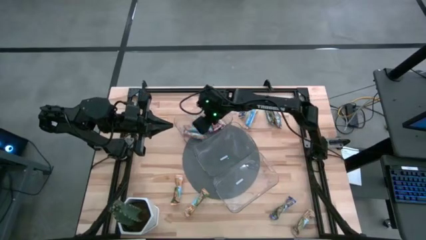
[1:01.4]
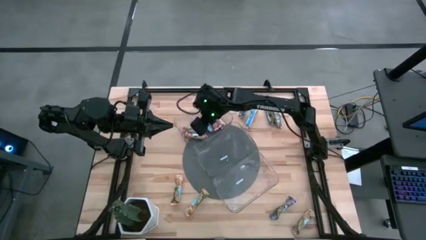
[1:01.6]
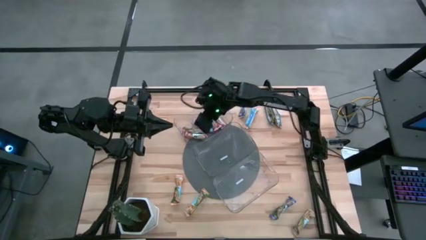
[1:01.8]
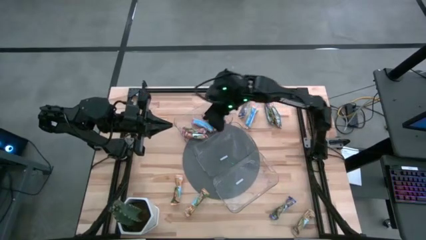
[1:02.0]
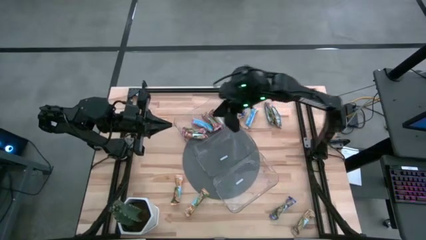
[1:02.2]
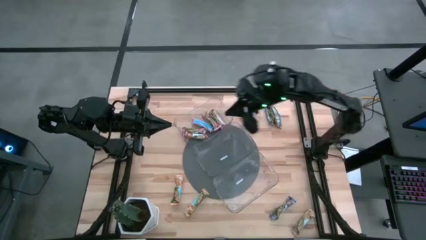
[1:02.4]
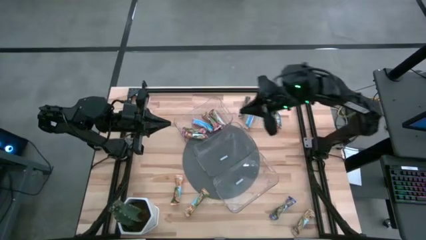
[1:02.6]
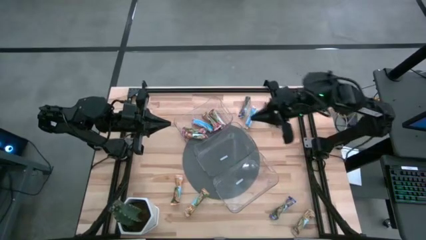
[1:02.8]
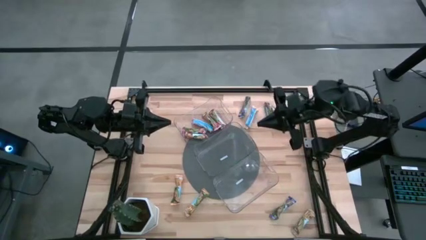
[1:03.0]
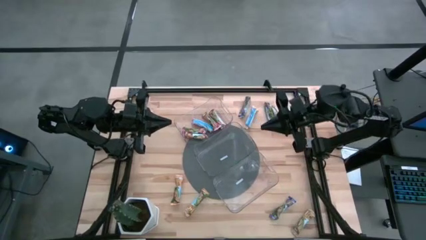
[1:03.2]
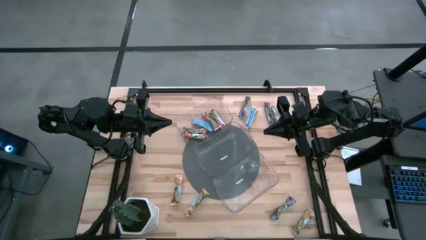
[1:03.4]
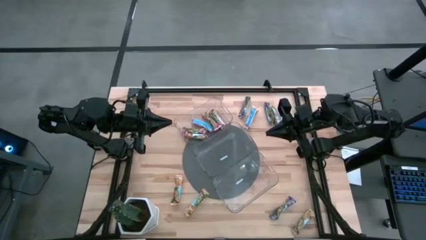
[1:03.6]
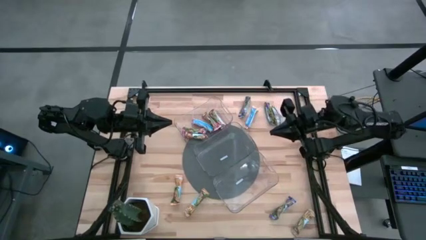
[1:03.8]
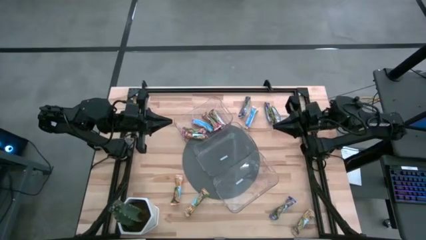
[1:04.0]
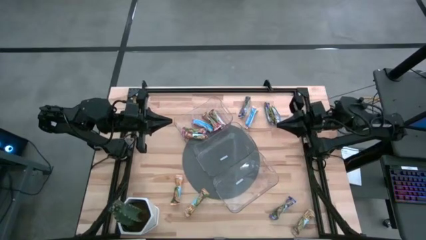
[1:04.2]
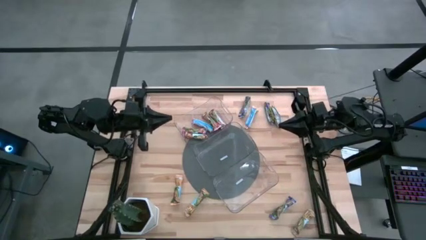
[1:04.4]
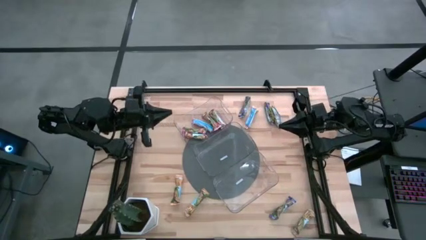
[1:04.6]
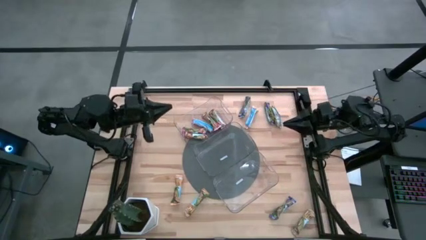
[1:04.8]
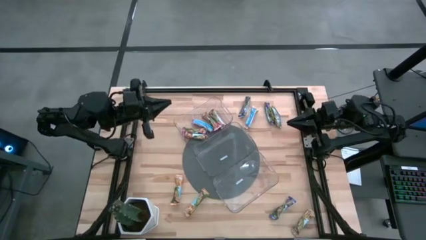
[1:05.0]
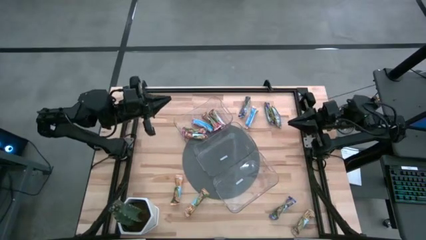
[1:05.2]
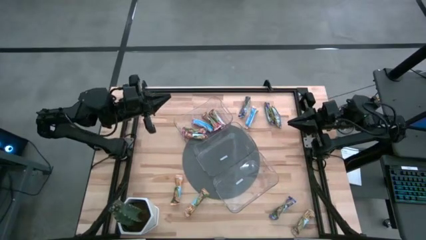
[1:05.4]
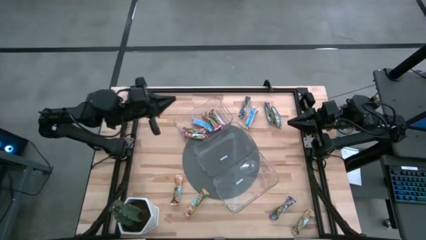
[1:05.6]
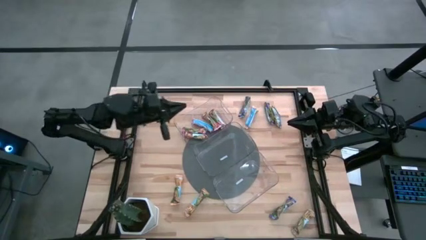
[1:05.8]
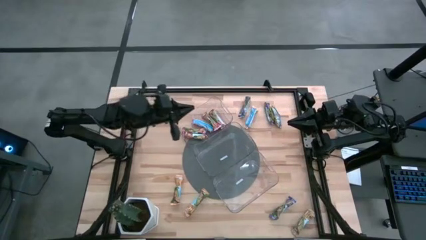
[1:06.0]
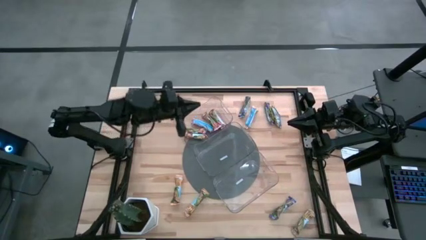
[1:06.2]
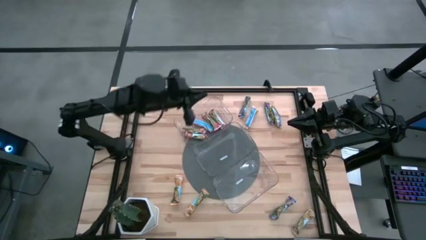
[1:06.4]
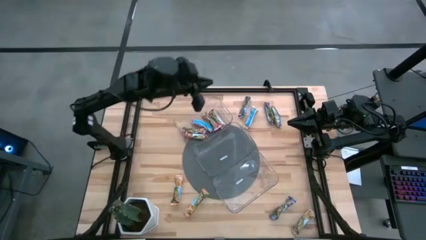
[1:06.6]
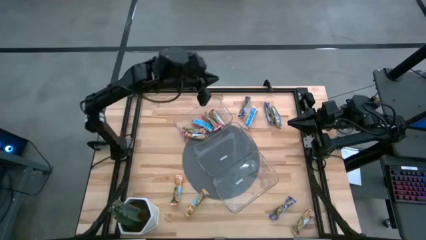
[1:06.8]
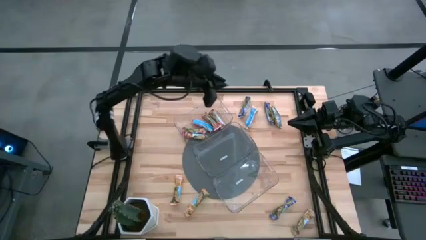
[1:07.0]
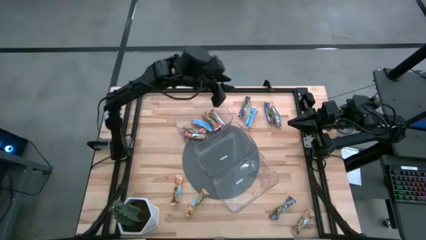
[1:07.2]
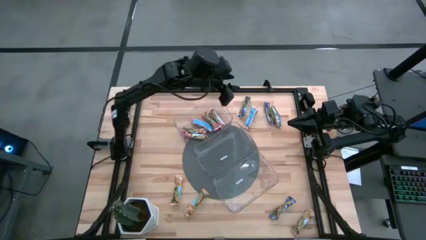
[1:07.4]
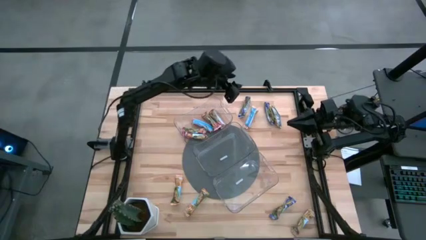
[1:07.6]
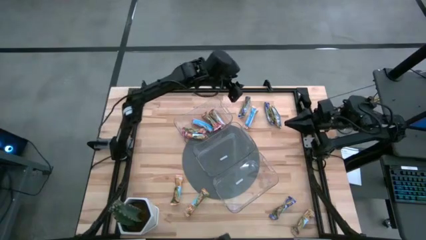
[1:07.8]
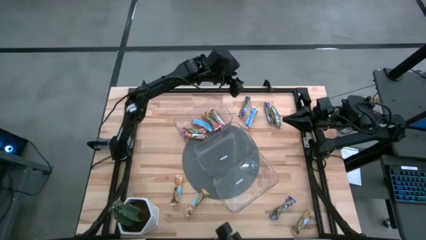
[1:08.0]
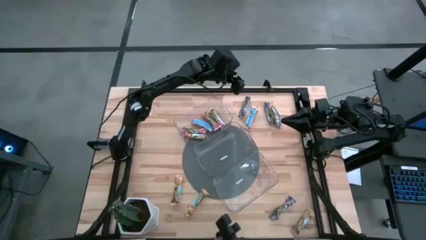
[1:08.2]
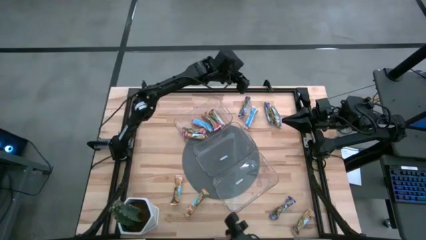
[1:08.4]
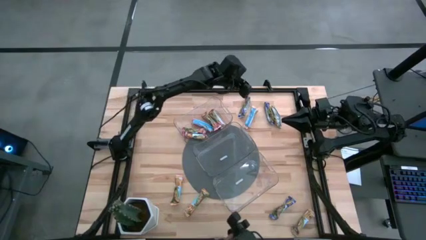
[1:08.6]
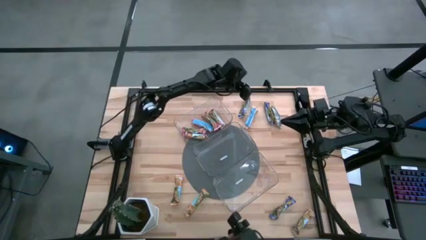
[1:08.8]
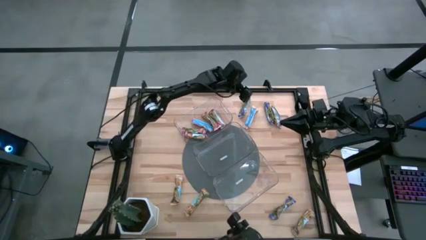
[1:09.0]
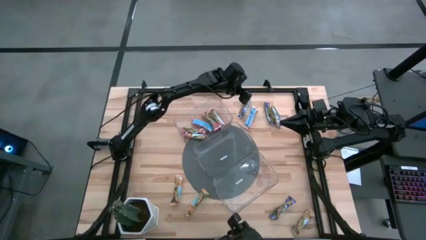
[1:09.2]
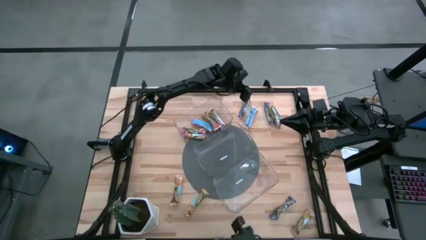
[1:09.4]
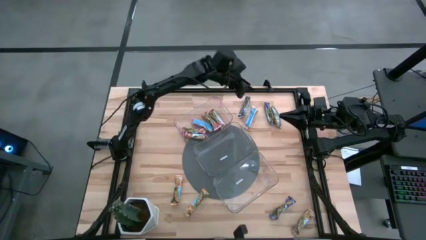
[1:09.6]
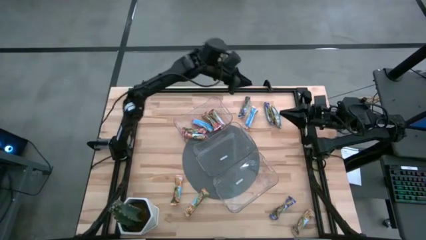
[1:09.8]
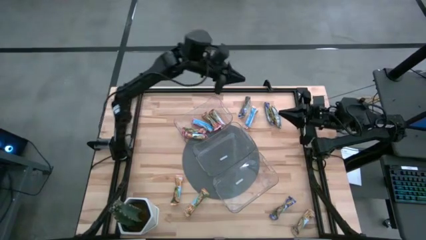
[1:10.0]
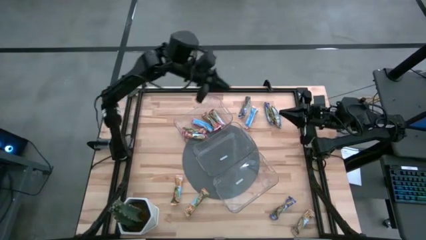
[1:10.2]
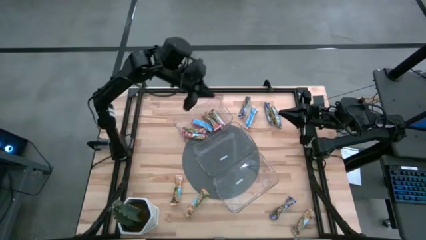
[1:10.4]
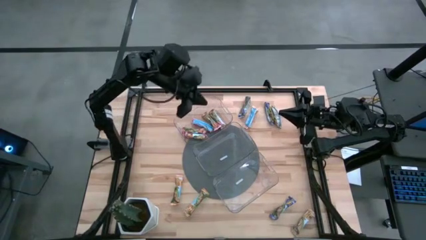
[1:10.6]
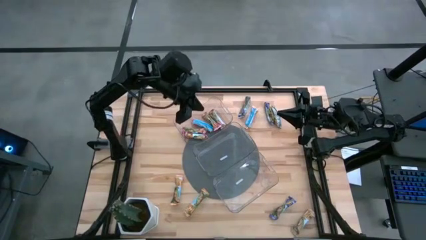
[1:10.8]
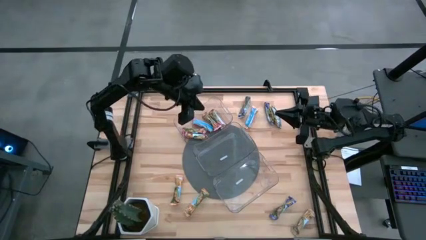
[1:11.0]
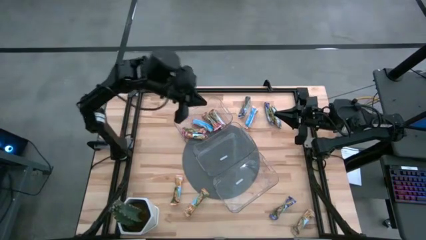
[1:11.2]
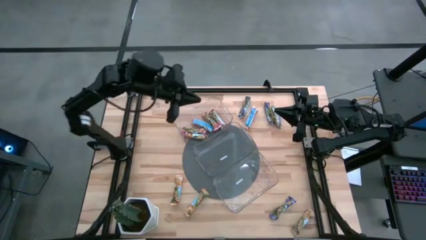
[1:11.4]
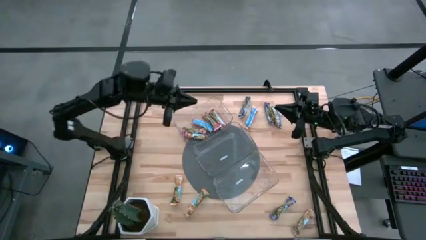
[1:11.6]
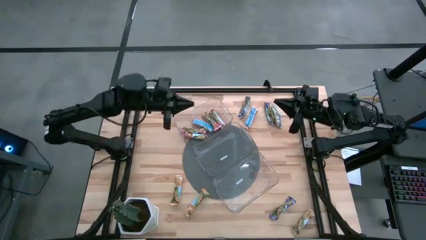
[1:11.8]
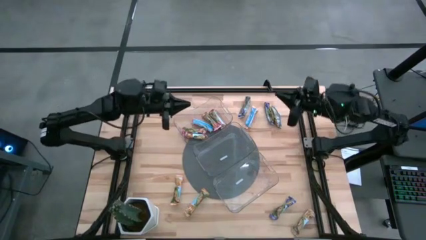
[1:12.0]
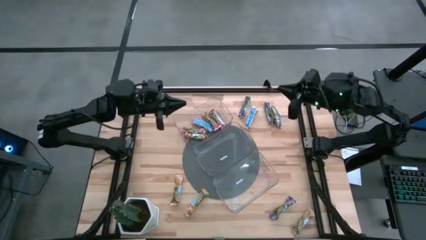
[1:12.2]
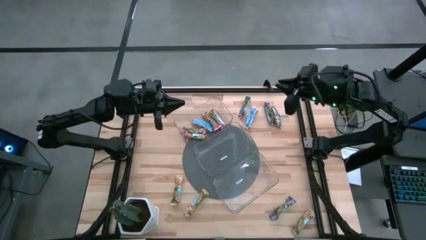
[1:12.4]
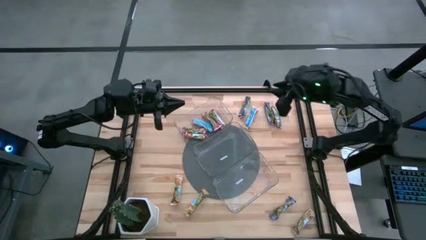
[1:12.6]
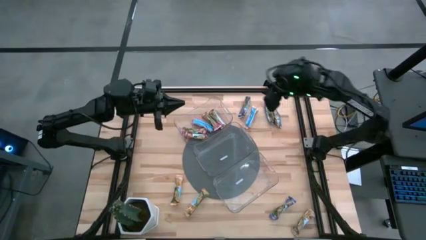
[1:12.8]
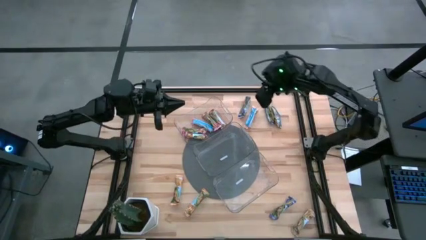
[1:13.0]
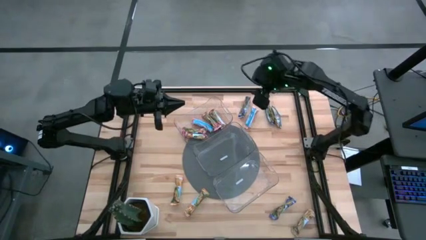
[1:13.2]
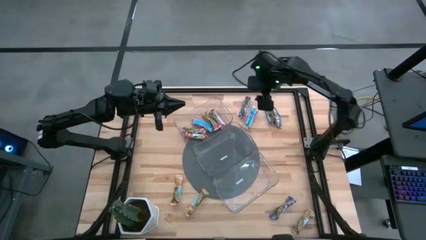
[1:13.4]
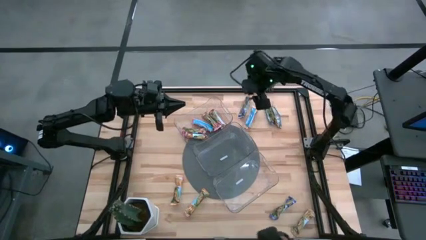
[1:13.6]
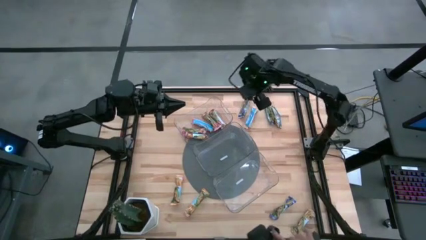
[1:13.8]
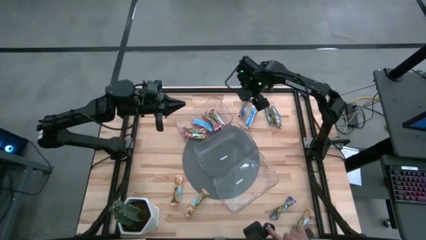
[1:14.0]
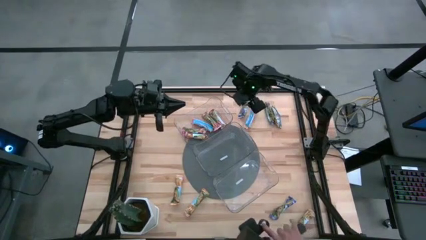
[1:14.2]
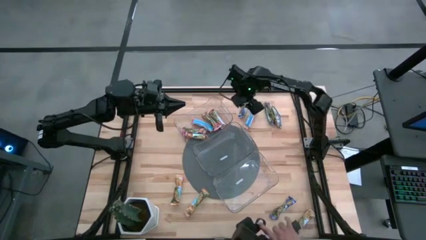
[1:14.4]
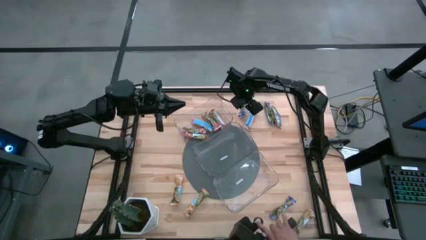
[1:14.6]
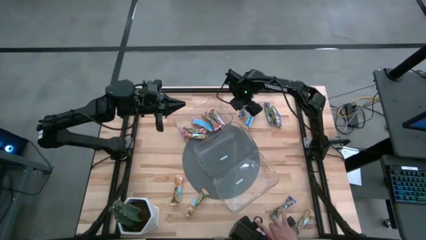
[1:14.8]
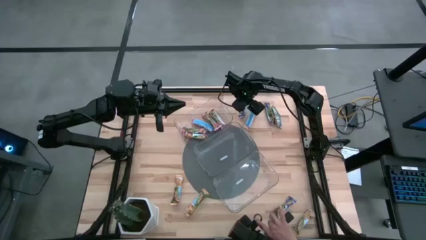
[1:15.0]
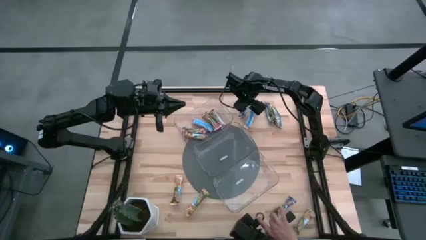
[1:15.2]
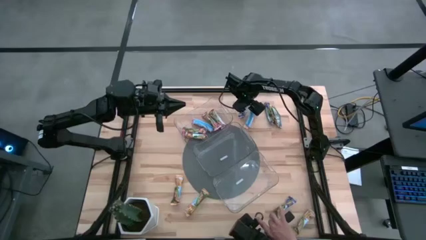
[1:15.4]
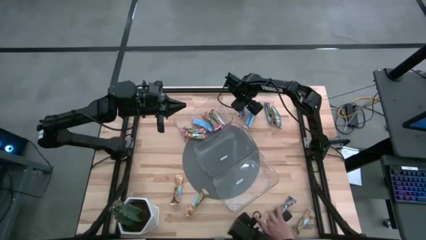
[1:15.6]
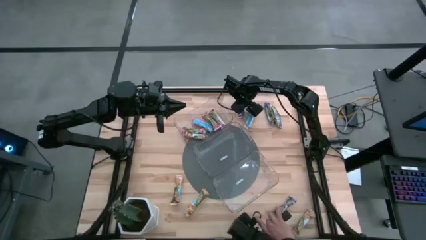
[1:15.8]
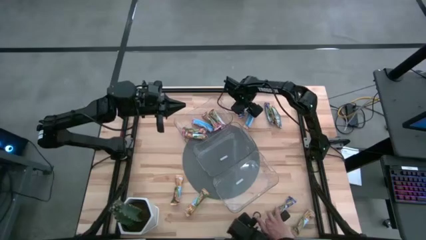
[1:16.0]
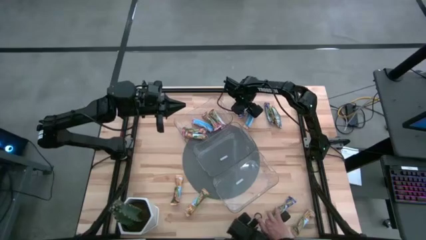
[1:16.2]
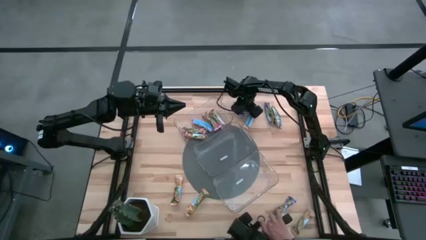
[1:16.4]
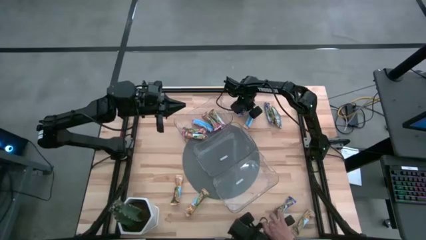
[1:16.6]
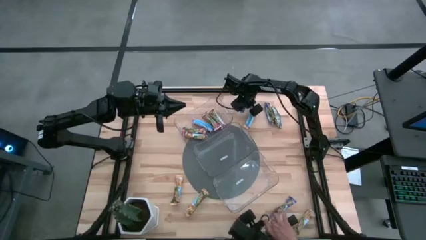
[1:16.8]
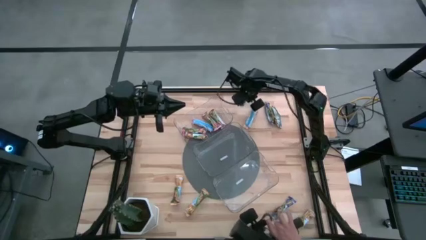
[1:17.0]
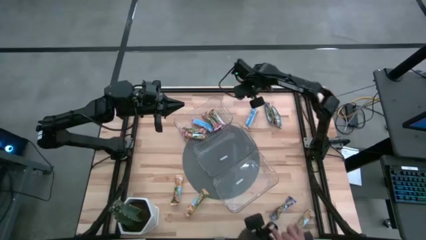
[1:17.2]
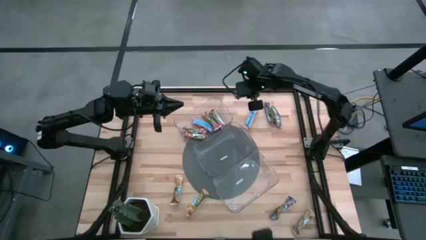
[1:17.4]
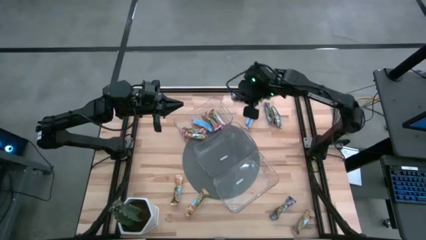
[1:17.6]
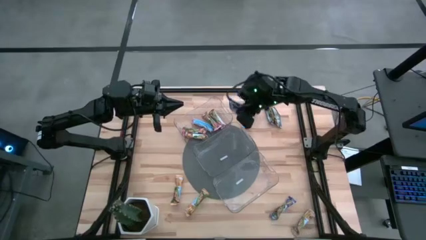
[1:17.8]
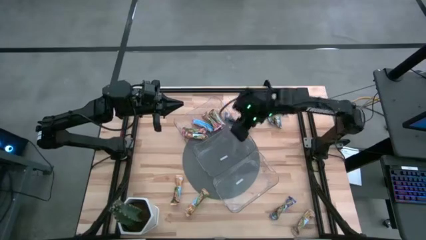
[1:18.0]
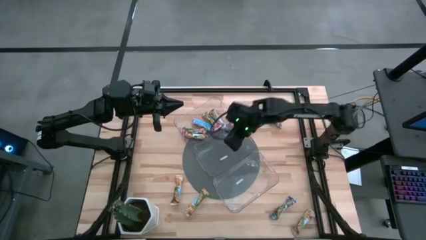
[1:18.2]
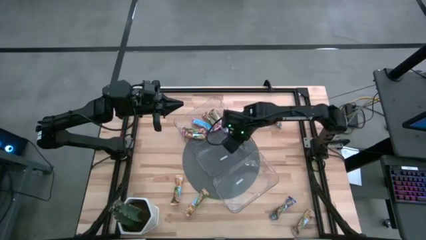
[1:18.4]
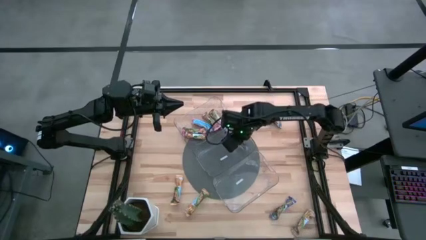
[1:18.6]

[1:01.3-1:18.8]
Task: Pick and place Granola Bars by type
Put the blue granola bar into the middle transparent bin
